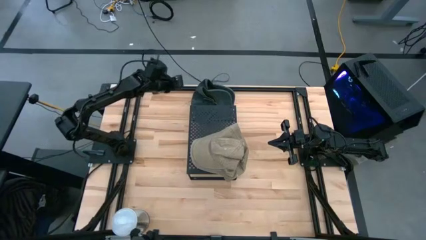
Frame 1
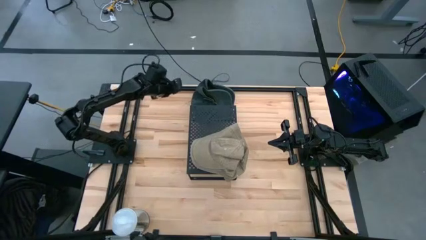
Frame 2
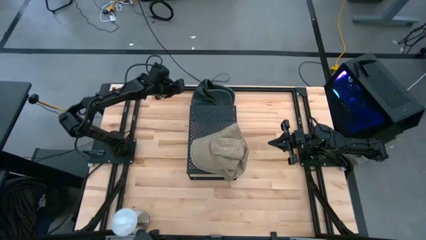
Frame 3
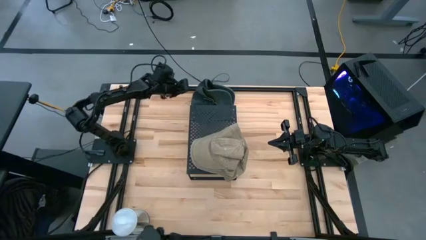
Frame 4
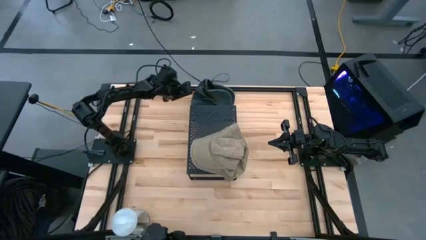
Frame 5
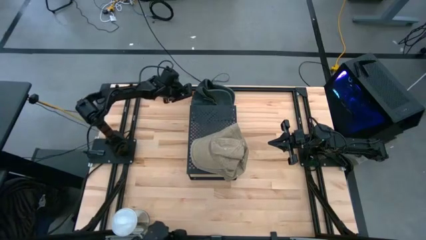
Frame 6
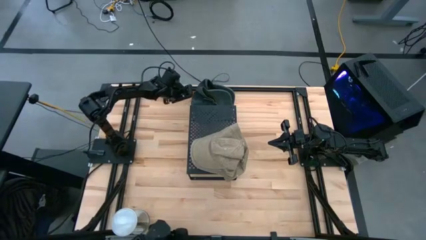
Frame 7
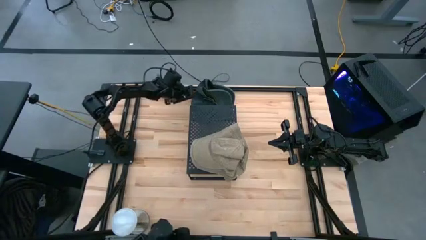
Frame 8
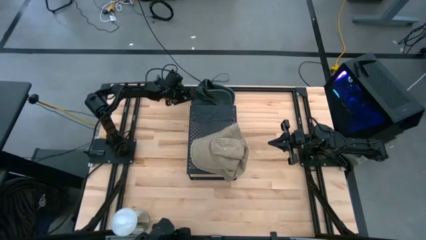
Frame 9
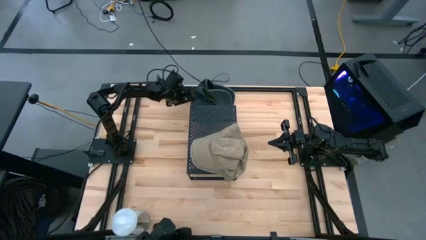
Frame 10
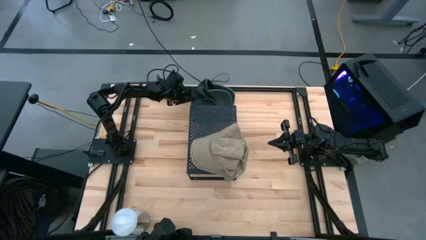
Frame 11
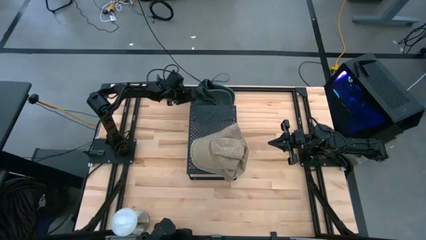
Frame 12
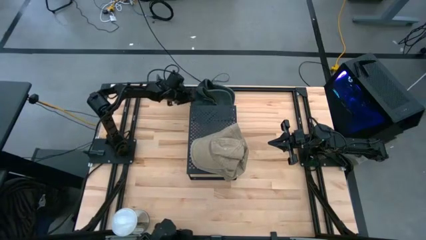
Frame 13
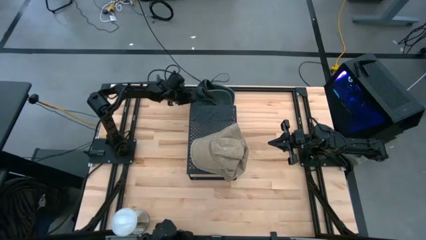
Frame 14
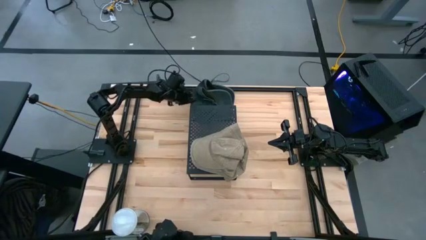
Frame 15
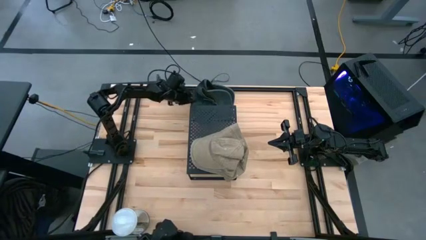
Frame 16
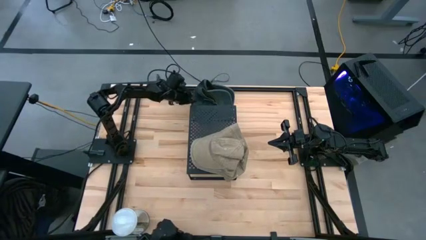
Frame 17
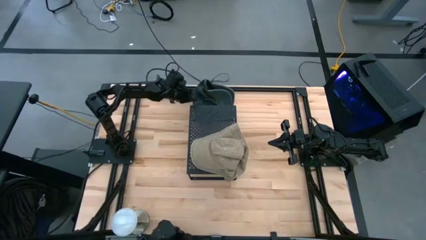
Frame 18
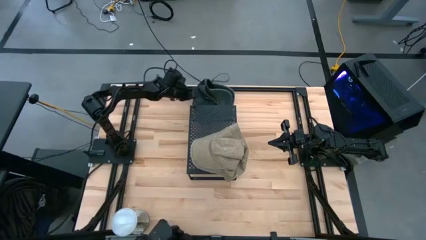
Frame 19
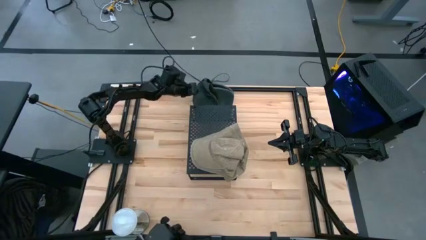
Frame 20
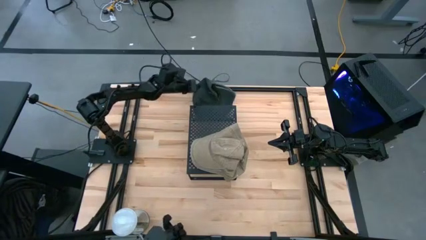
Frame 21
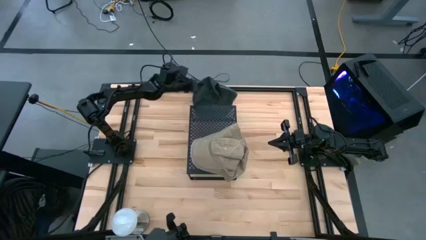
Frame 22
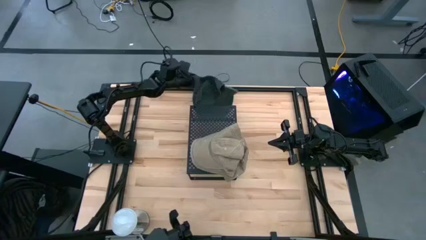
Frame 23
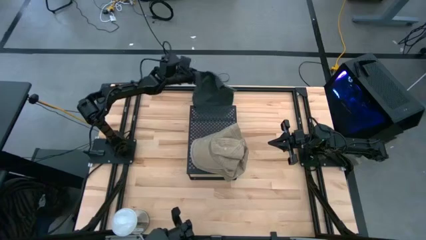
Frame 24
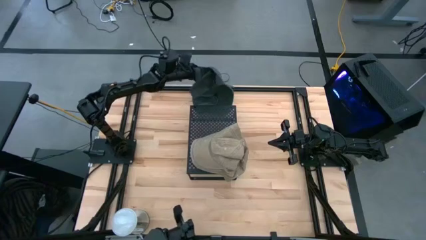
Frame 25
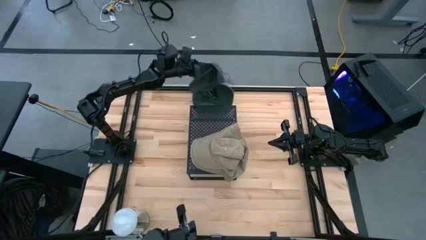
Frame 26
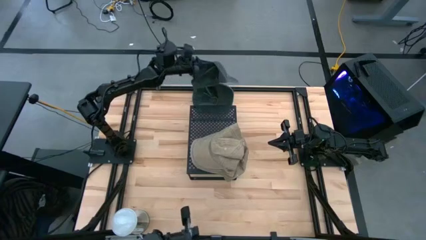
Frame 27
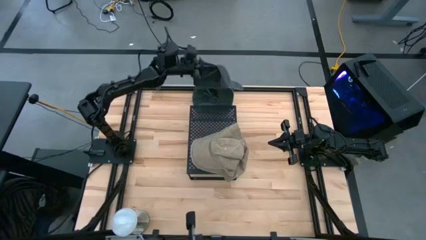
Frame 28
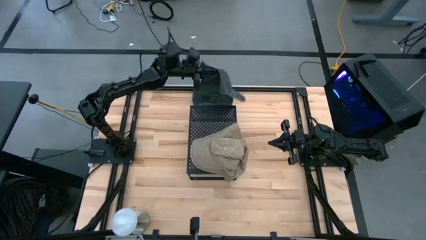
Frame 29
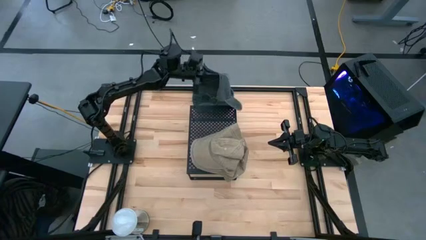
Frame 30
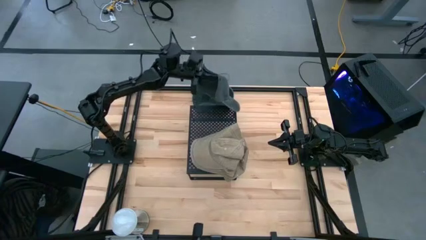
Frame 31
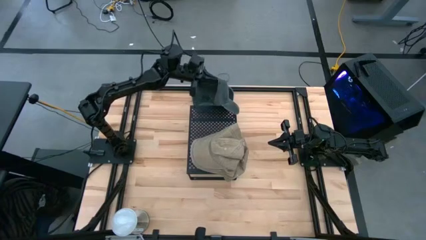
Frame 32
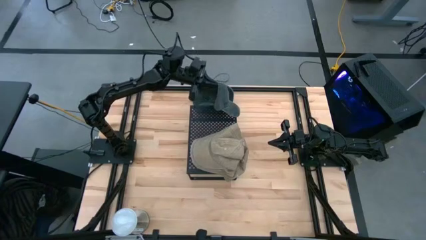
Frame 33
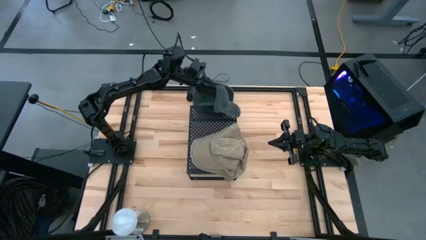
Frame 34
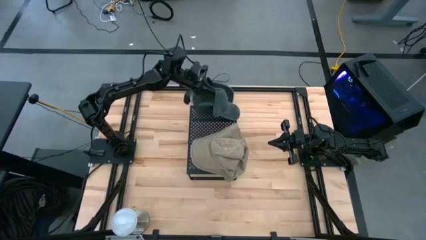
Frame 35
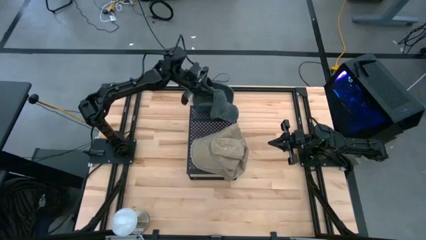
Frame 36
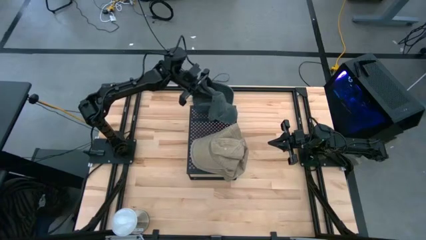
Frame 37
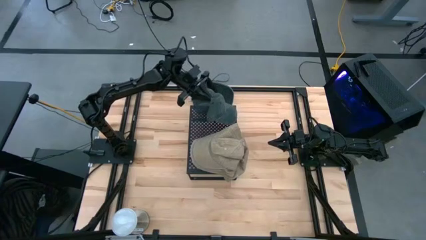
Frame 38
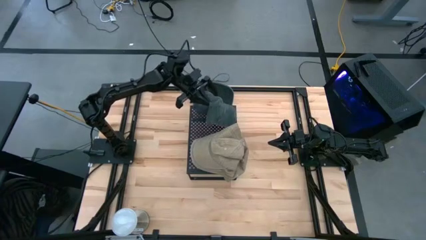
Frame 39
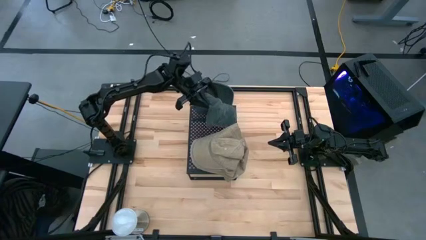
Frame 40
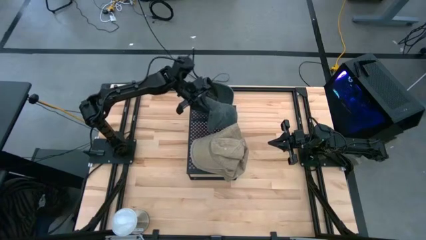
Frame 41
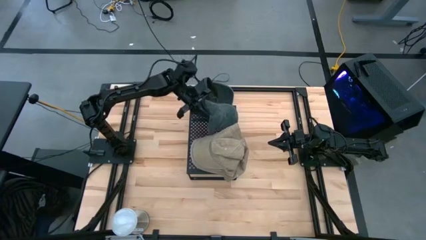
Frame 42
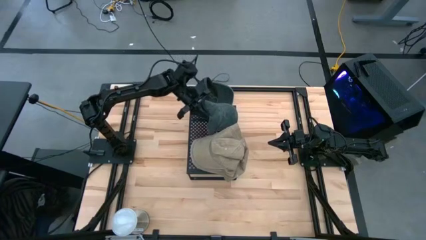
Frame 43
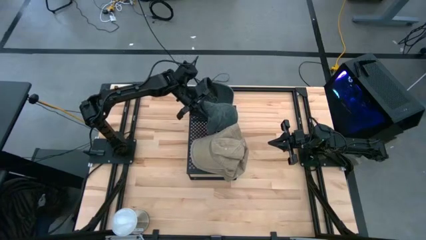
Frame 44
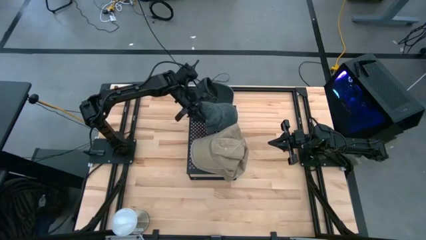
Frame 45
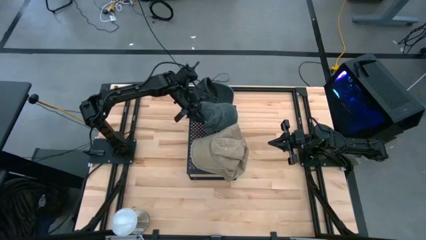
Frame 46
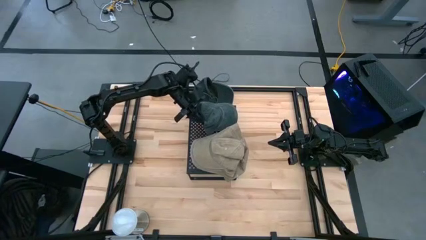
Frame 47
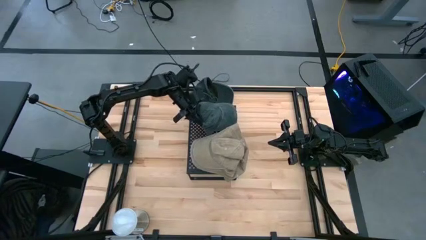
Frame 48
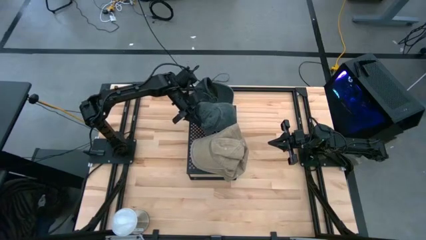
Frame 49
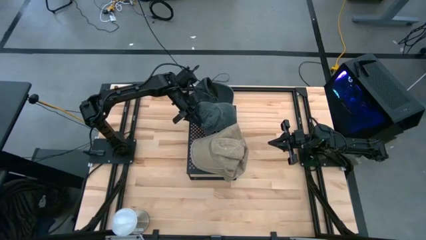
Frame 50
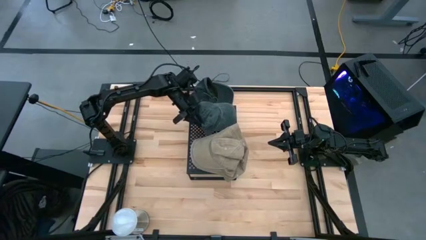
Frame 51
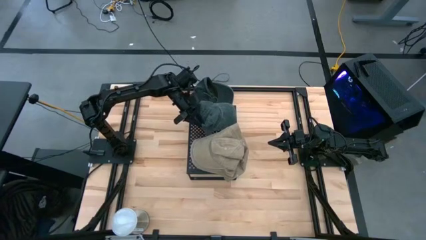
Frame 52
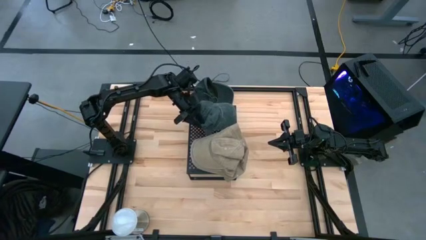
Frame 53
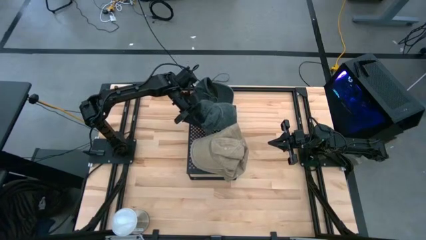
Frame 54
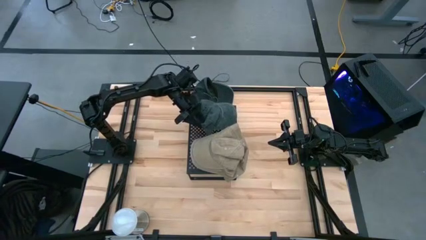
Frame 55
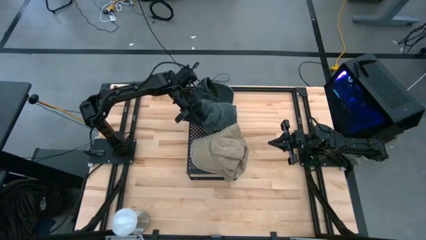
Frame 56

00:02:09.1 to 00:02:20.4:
Task: Pick & Place hat
Put the bottom gray cap on the shelf
